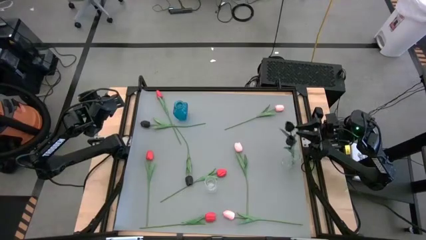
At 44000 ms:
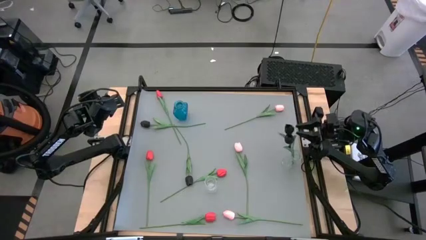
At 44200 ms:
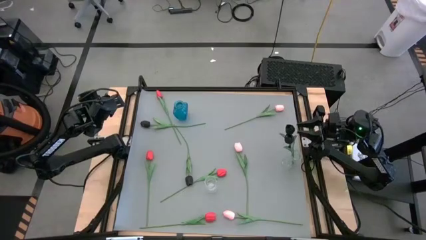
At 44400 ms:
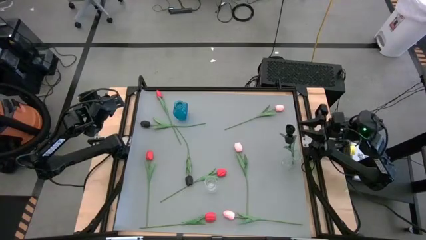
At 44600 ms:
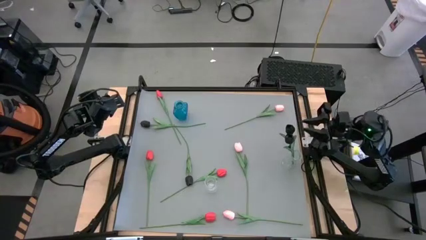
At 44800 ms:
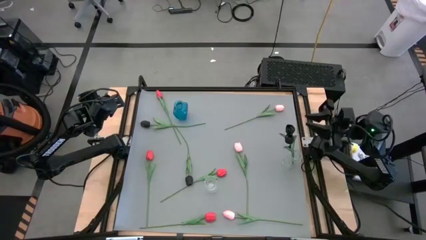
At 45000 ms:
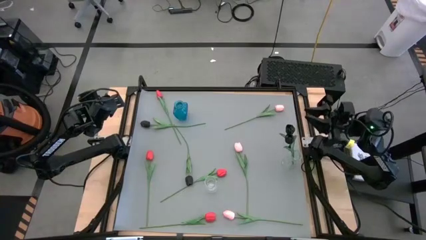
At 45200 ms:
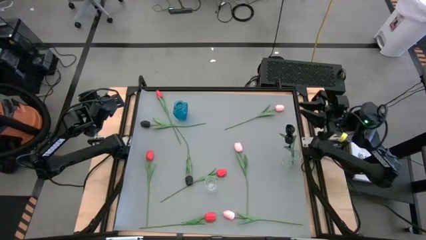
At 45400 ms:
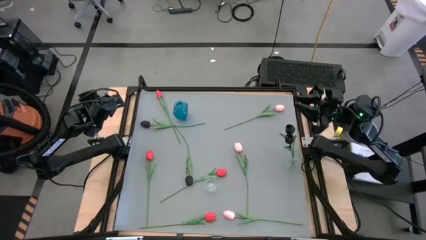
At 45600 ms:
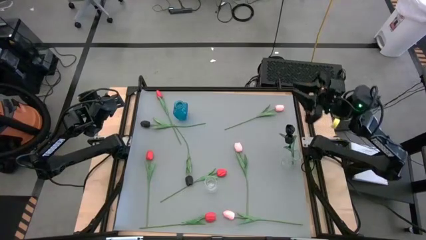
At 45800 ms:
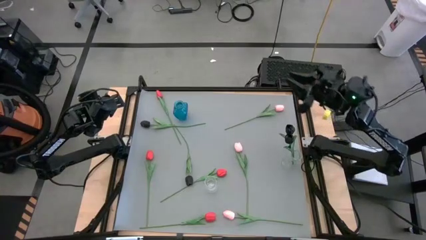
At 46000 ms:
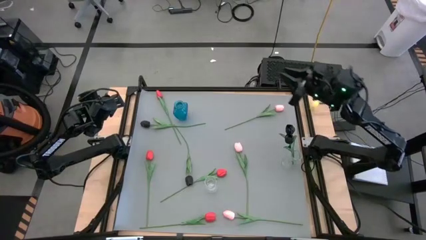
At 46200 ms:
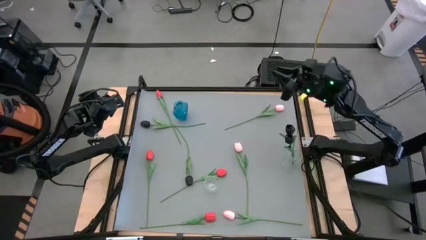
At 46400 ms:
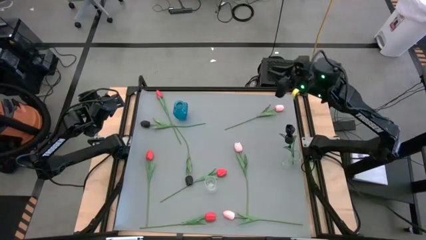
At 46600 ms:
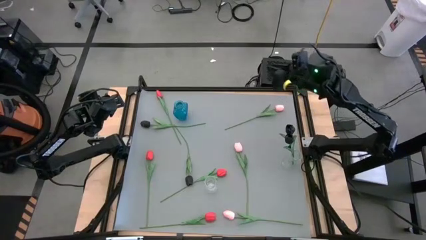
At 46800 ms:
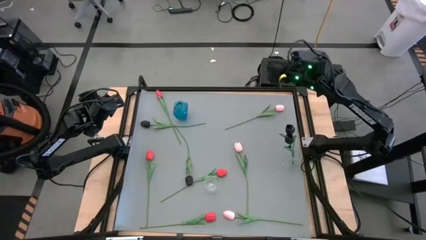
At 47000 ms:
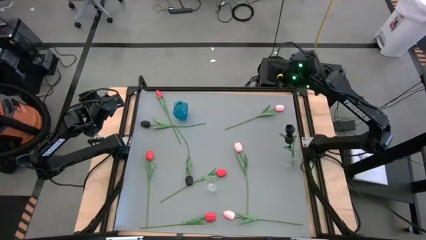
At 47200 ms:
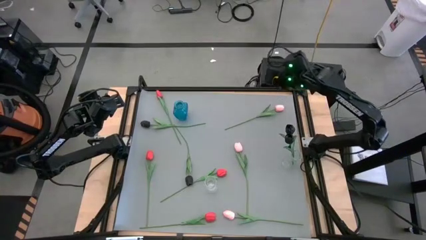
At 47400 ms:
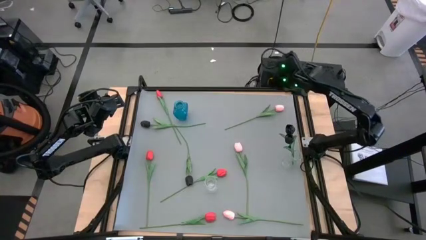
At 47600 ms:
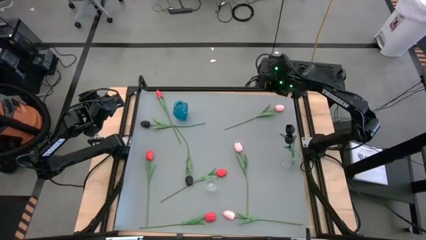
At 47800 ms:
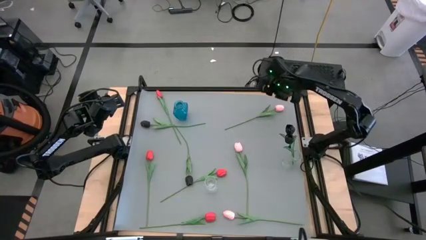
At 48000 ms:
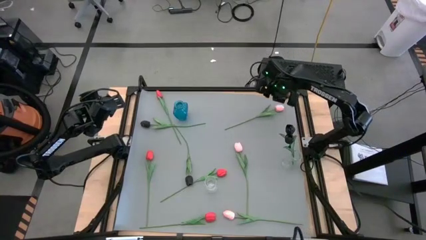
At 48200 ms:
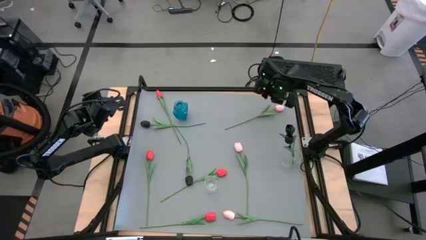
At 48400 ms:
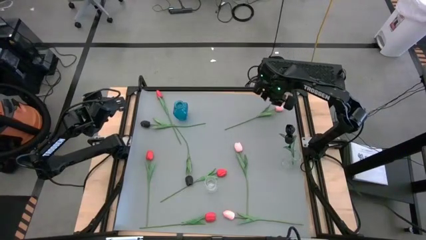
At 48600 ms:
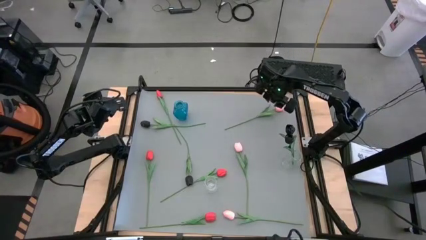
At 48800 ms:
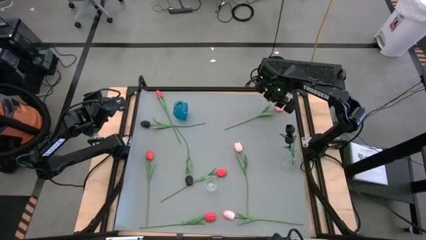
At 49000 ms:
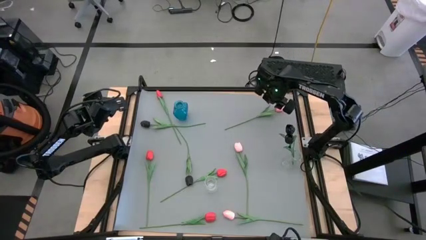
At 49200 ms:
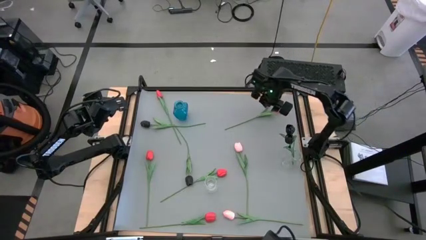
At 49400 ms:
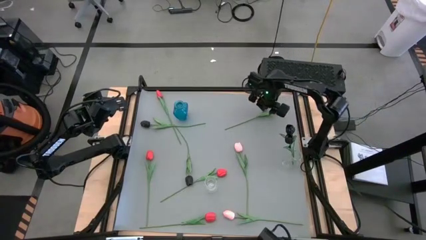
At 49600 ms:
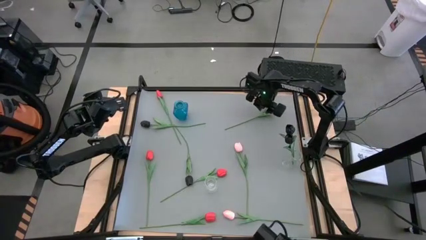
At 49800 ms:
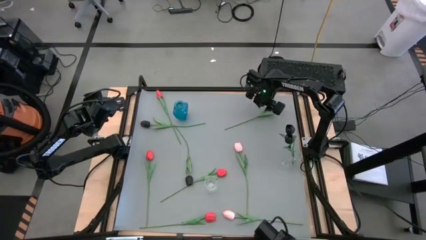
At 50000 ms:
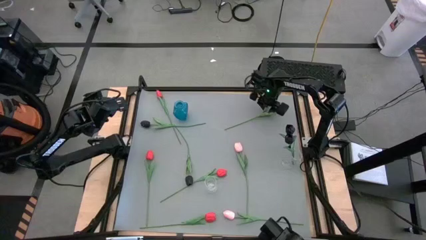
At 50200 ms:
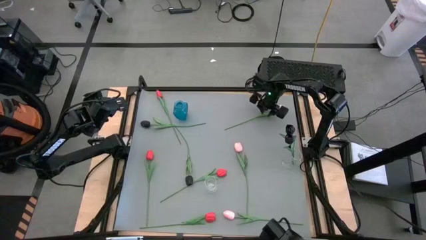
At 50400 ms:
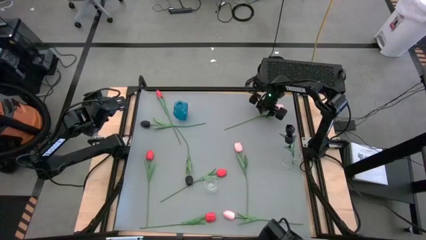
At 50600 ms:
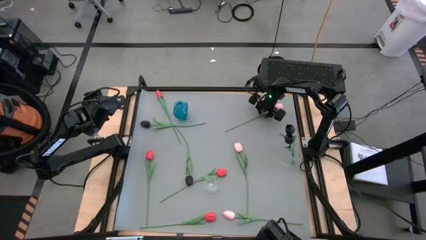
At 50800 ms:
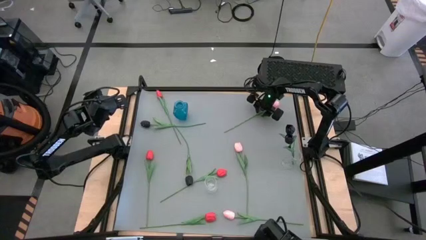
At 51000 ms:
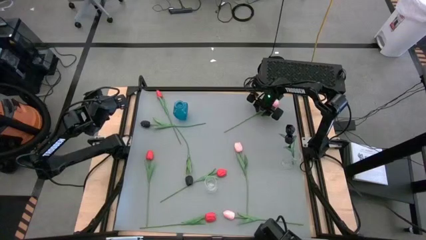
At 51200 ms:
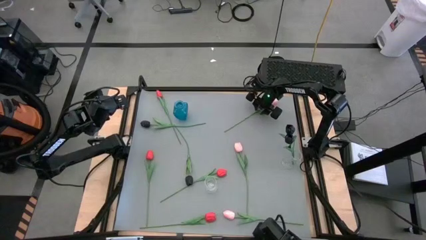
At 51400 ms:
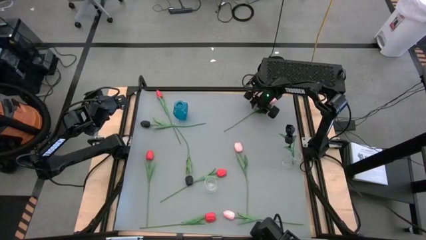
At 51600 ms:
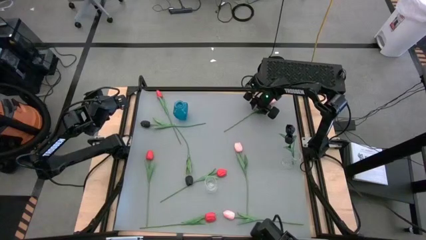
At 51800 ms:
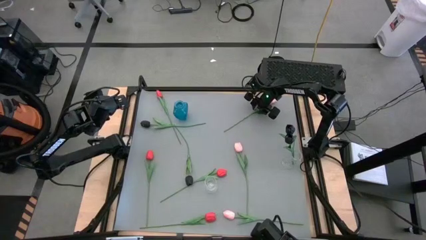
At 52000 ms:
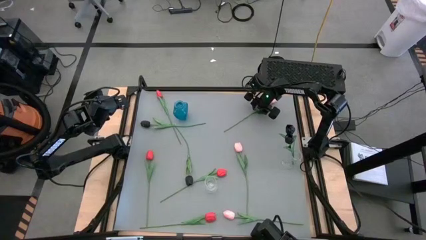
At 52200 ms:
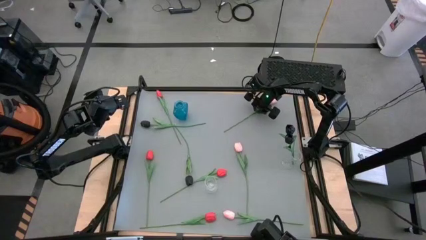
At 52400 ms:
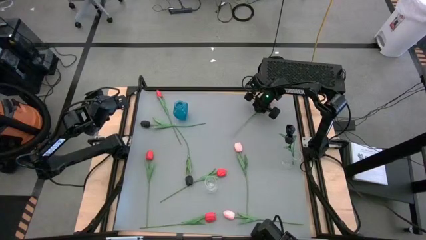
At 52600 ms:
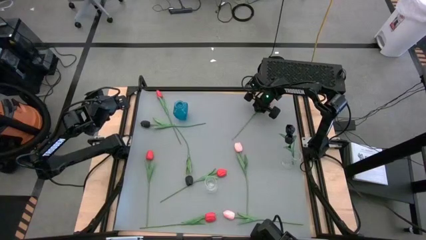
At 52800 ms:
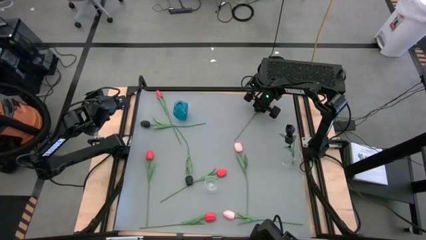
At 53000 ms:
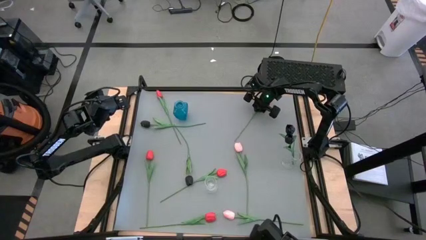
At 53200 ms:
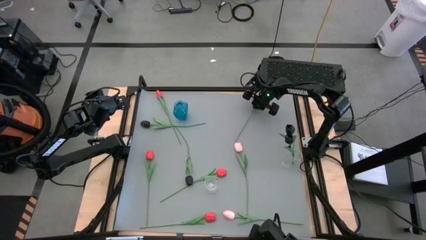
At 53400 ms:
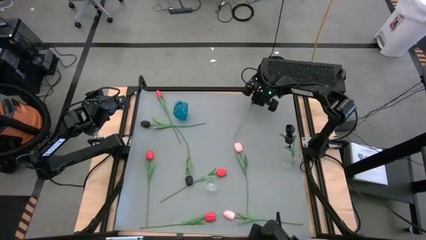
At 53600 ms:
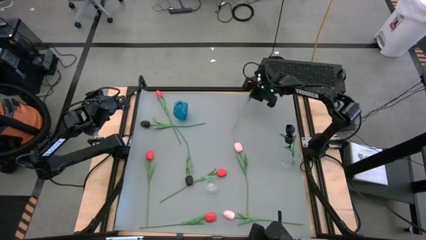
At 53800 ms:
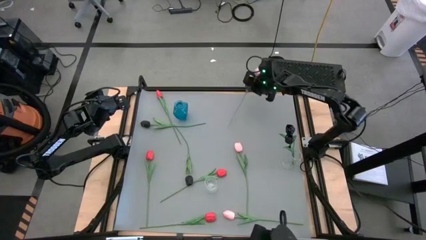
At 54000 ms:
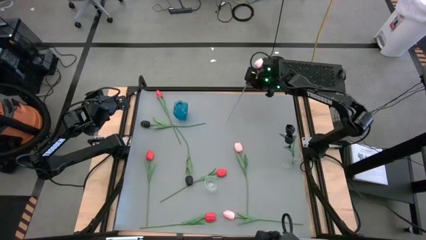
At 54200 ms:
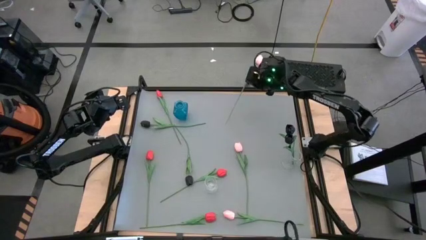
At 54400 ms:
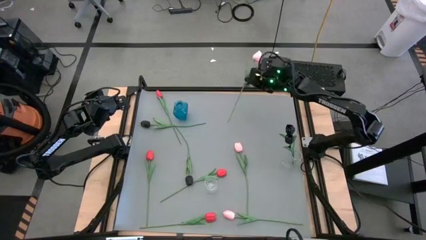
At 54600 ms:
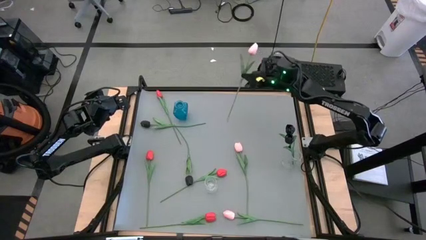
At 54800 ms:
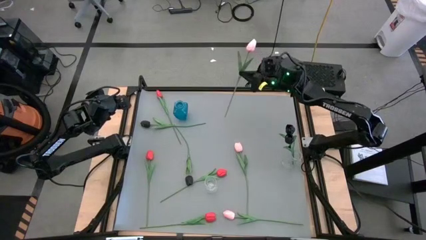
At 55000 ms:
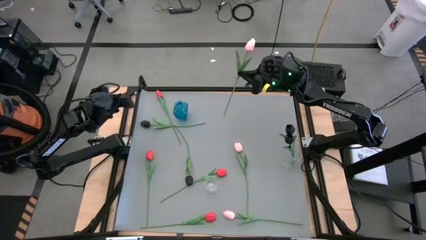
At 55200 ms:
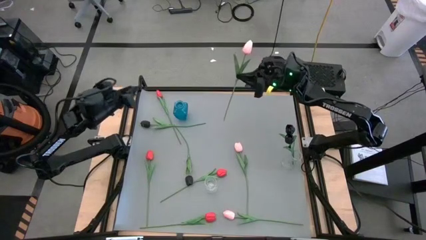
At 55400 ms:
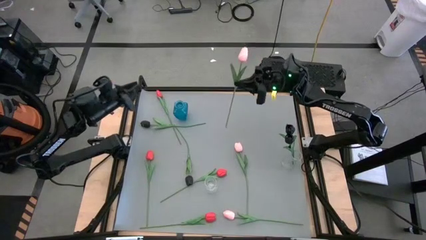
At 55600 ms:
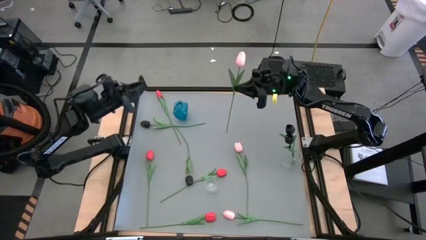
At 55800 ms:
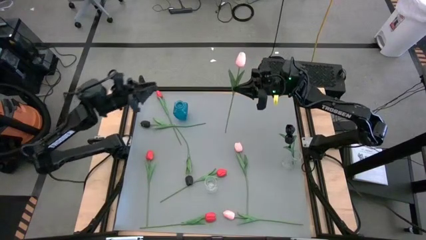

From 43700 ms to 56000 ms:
Task: Sort flowers into vase by color
Put pink flower into the blue vase
